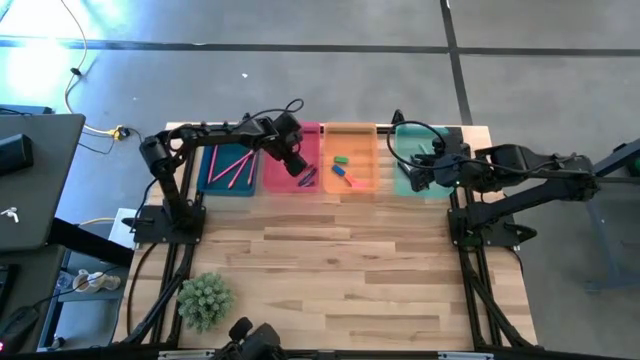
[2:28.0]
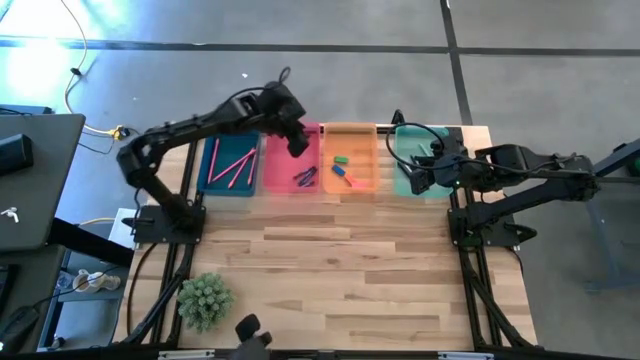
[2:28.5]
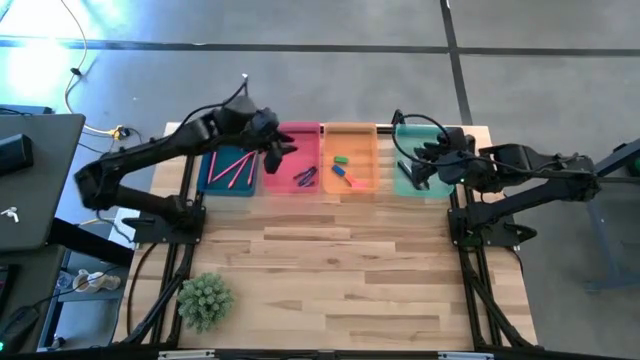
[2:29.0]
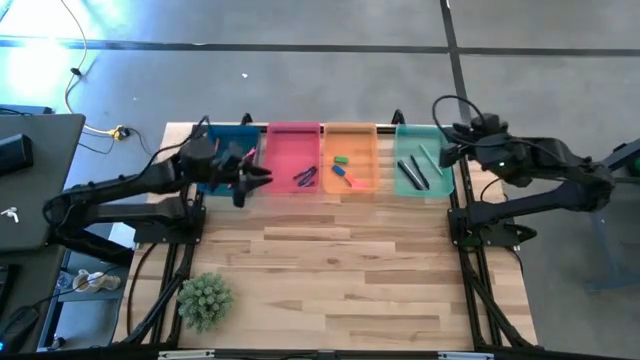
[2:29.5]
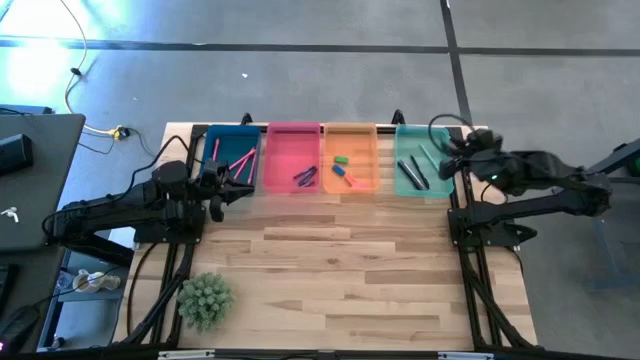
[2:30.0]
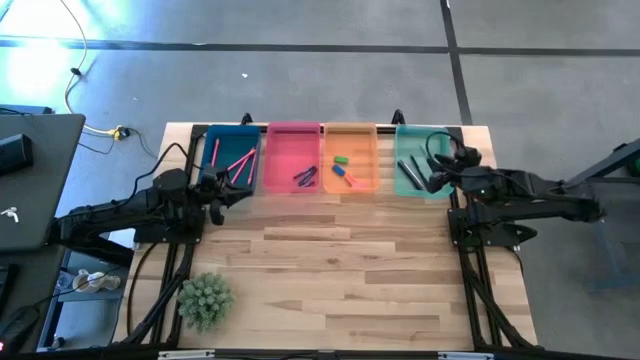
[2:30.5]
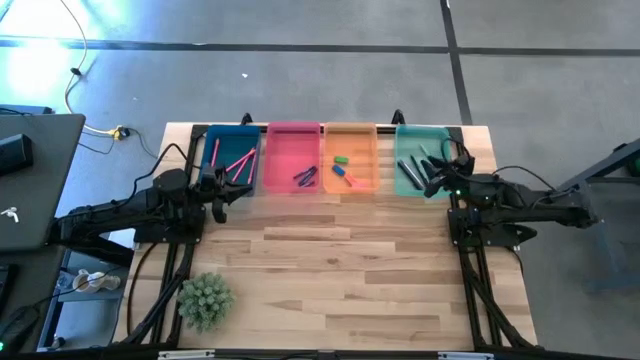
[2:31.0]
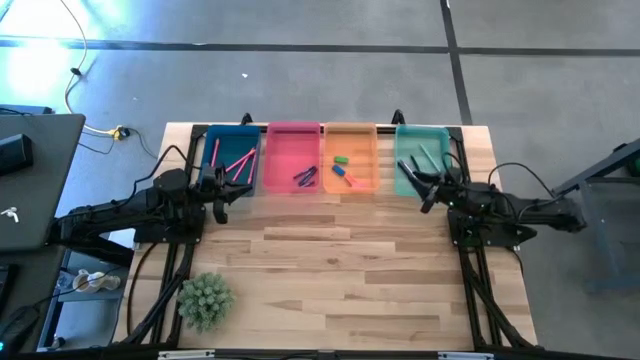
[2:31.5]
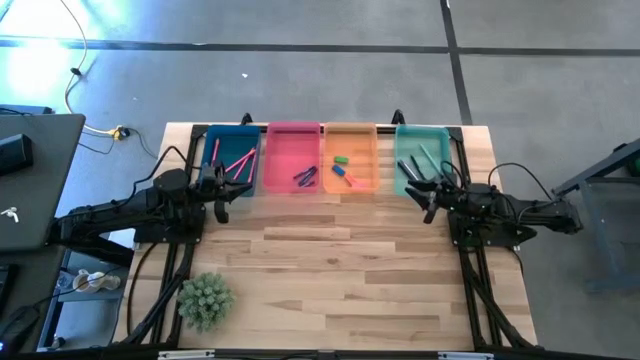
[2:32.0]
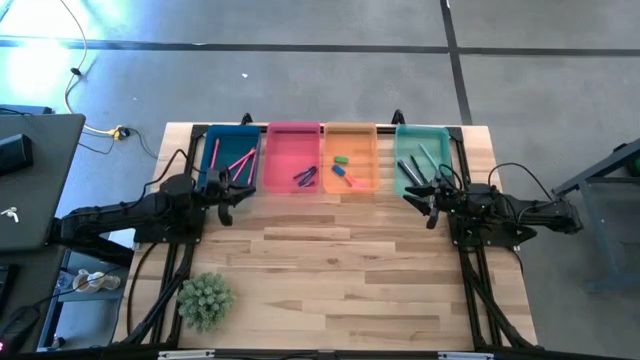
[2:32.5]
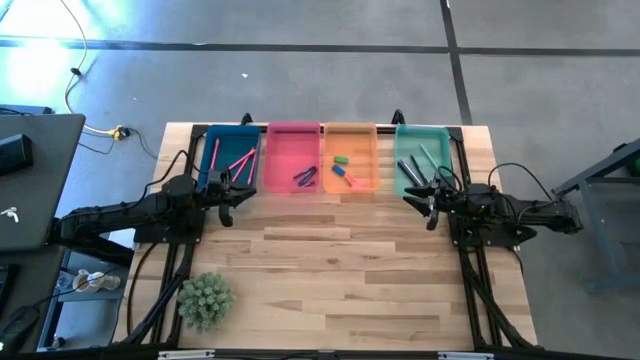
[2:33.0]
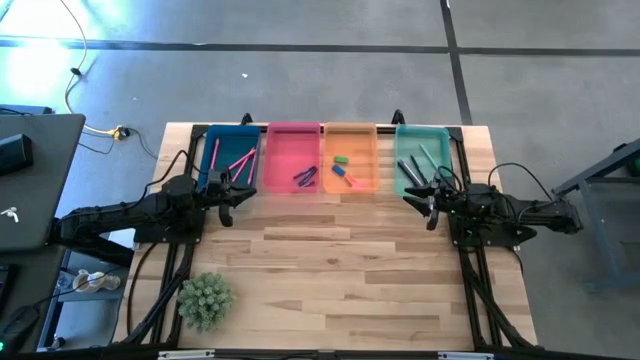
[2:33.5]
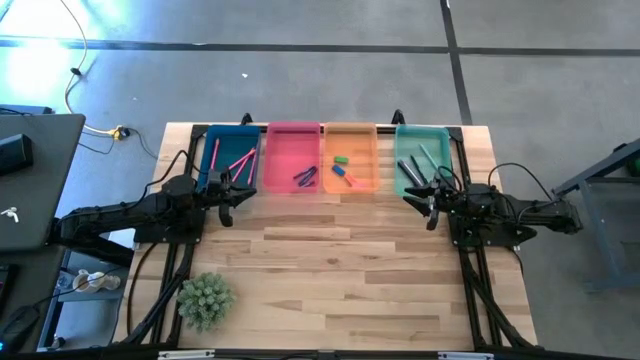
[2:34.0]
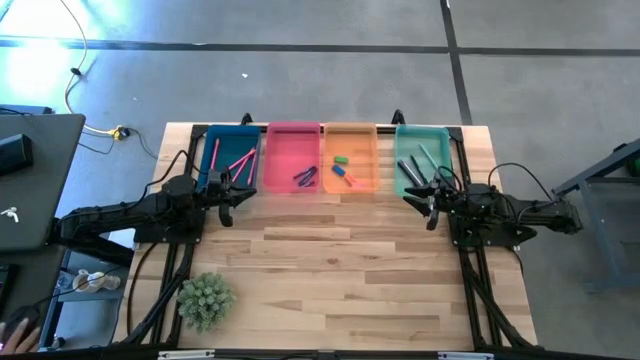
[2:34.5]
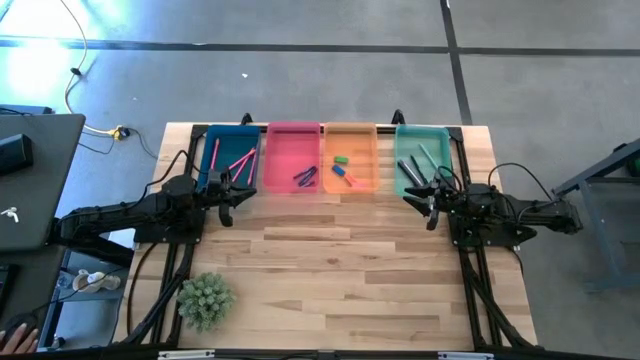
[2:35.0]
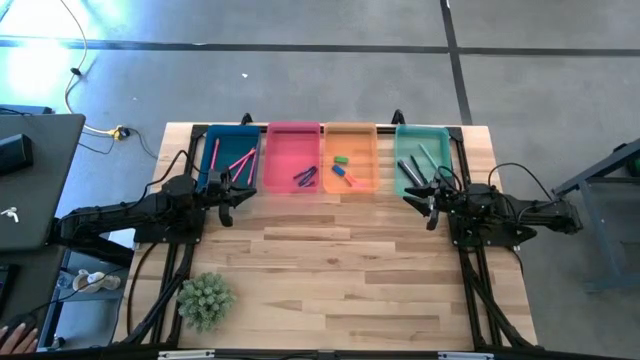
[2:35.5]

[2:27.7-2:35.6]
Task: Sort crayons/erasers/pens/pencils in bins
Return to Home Position

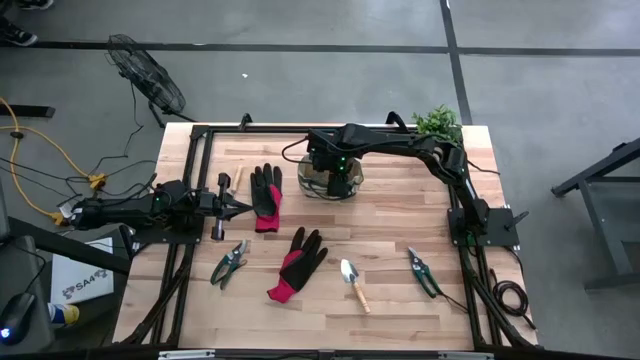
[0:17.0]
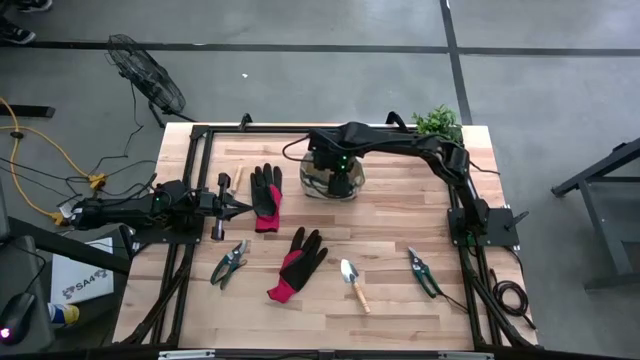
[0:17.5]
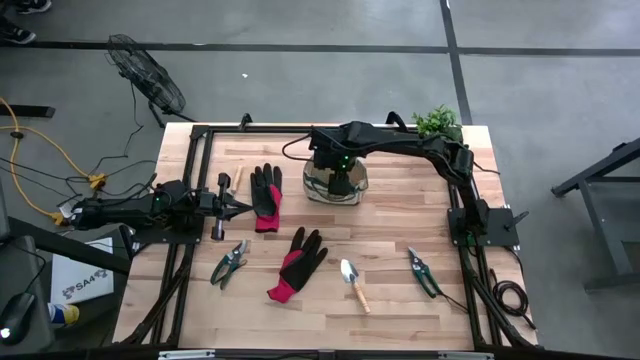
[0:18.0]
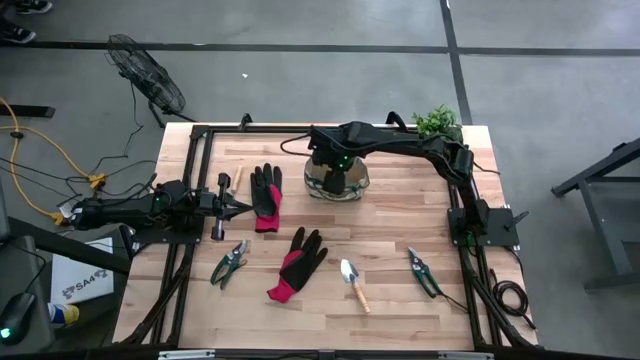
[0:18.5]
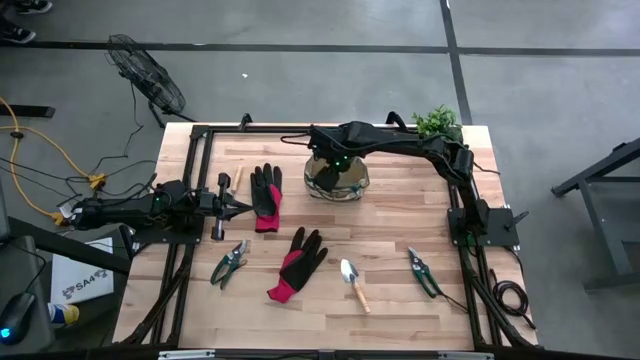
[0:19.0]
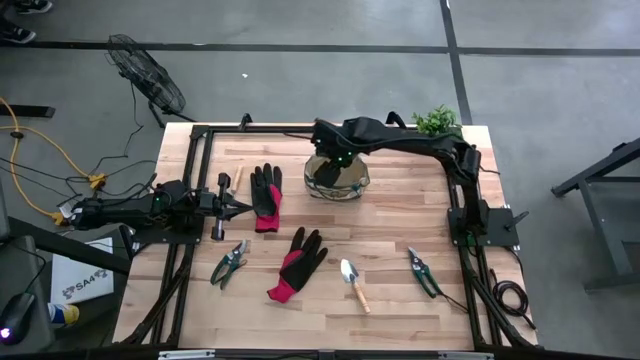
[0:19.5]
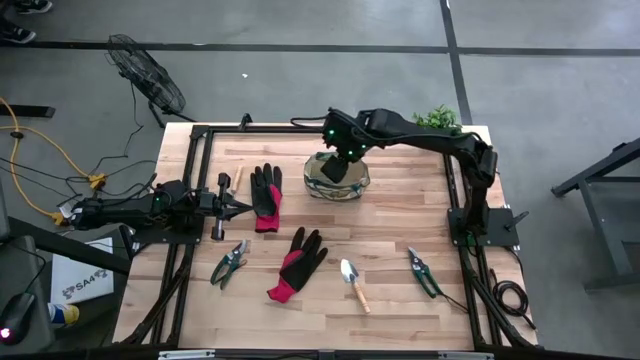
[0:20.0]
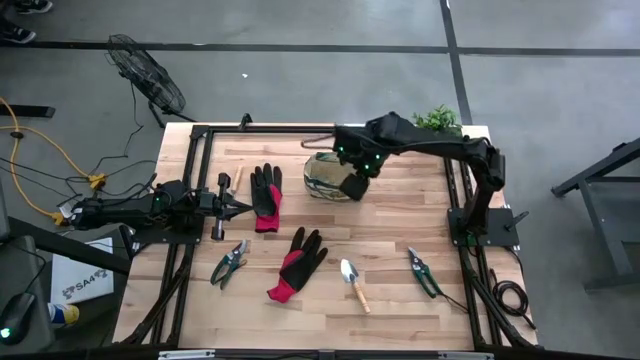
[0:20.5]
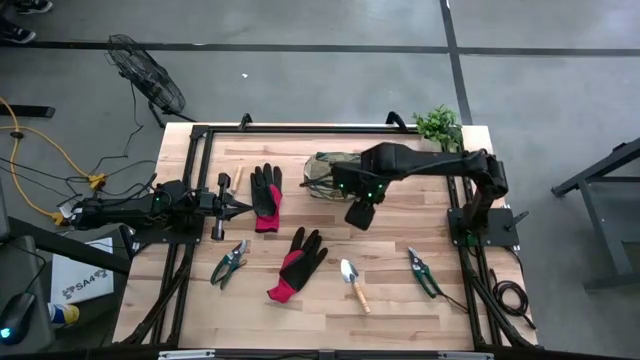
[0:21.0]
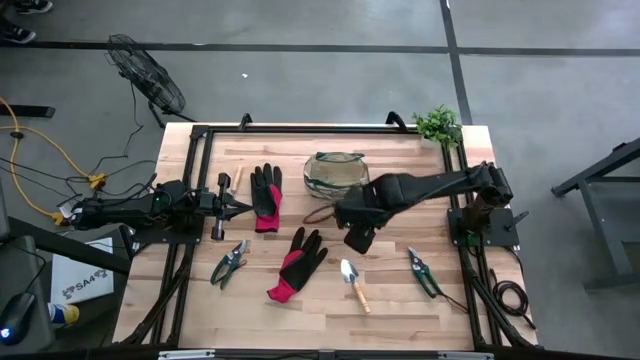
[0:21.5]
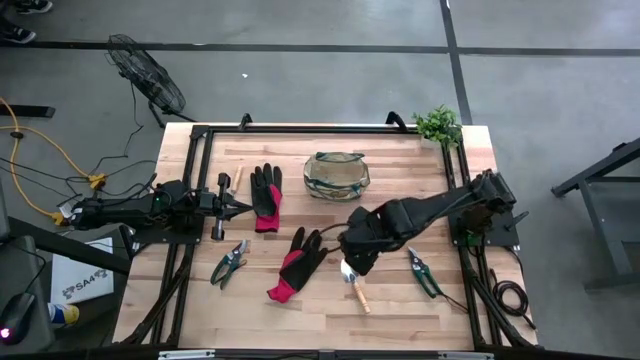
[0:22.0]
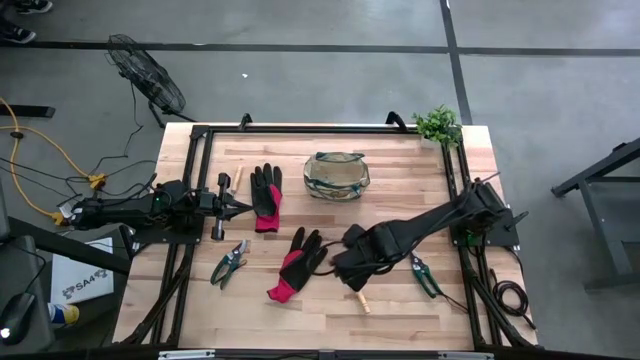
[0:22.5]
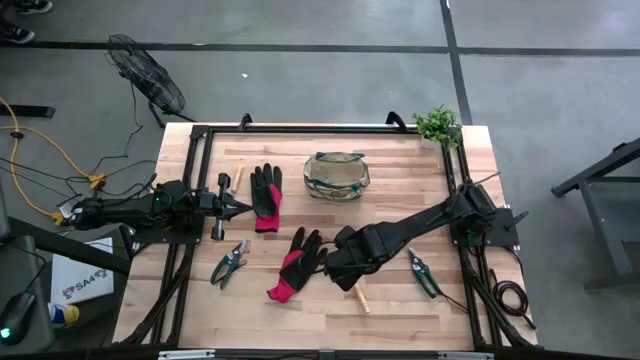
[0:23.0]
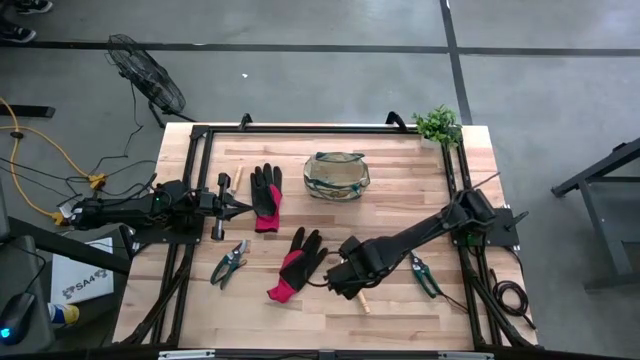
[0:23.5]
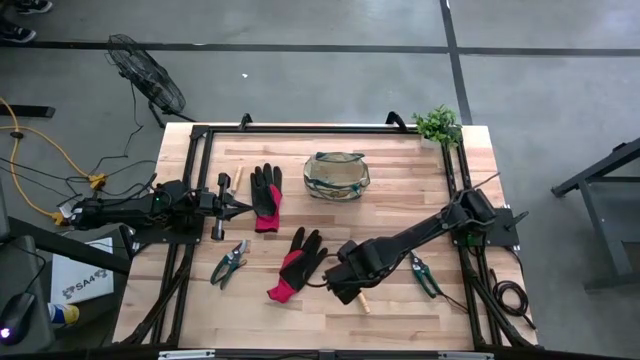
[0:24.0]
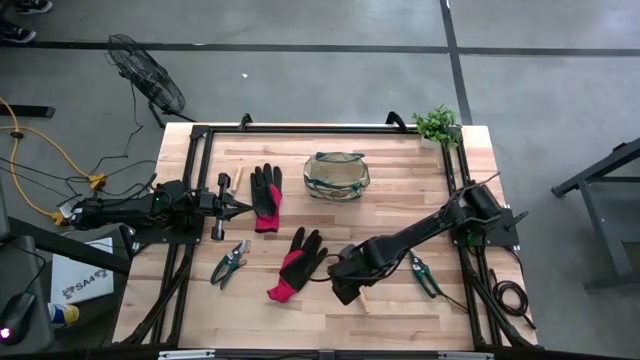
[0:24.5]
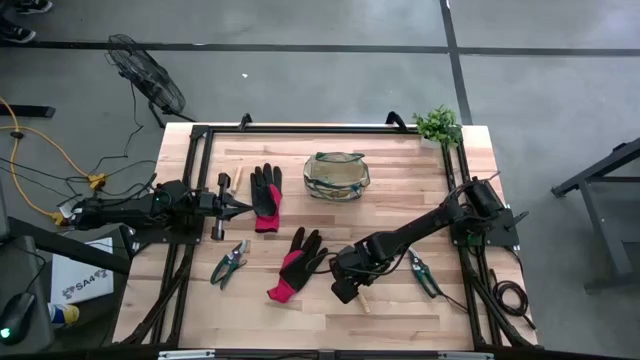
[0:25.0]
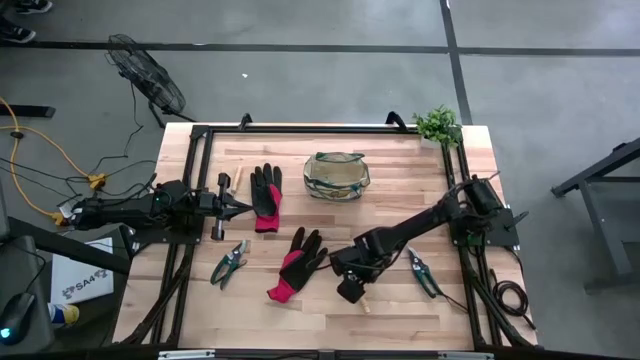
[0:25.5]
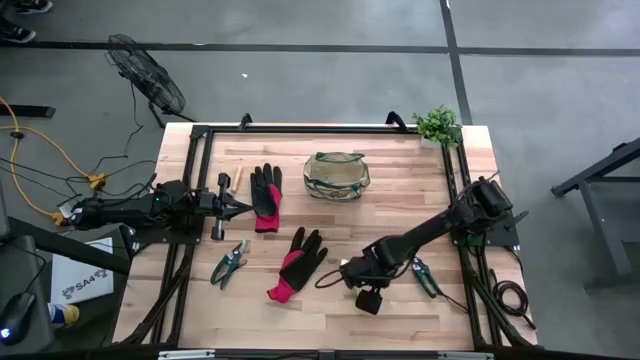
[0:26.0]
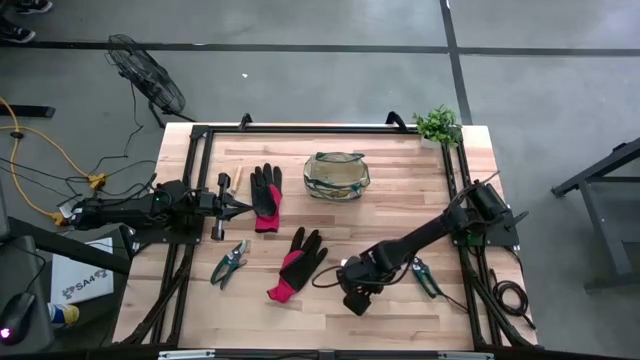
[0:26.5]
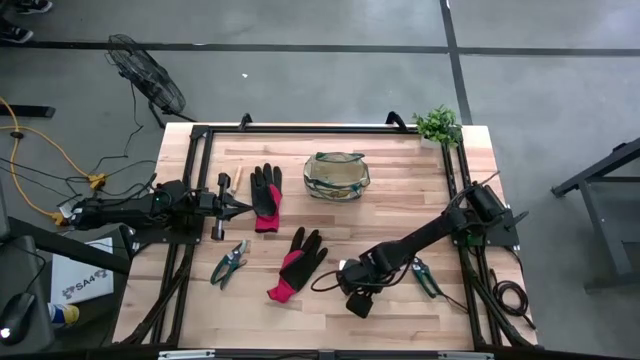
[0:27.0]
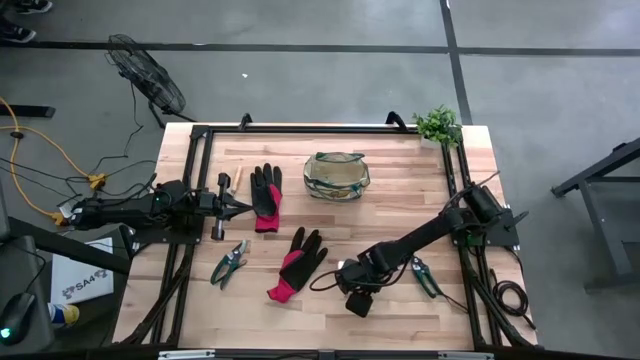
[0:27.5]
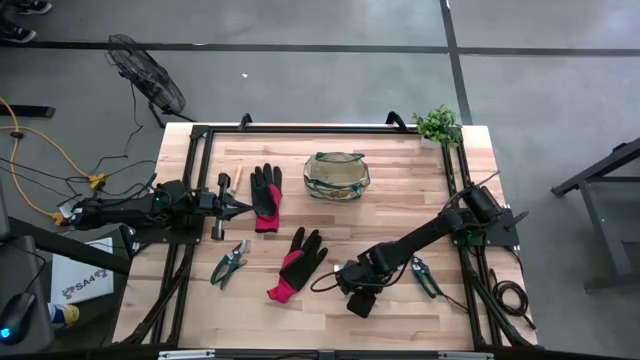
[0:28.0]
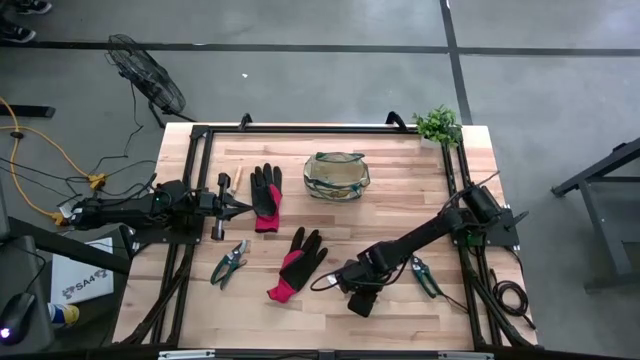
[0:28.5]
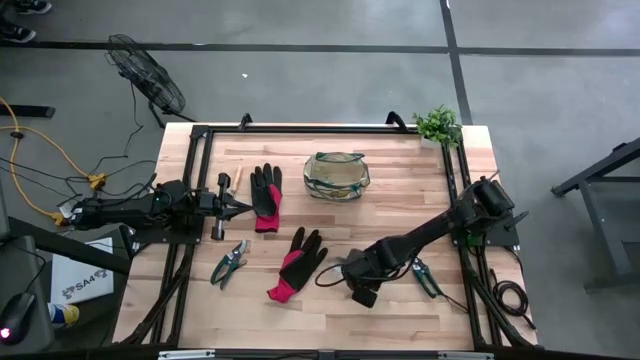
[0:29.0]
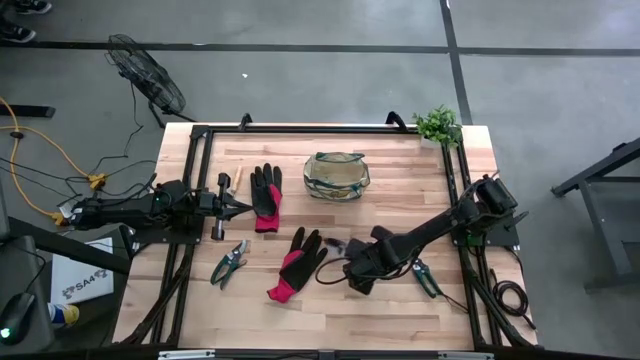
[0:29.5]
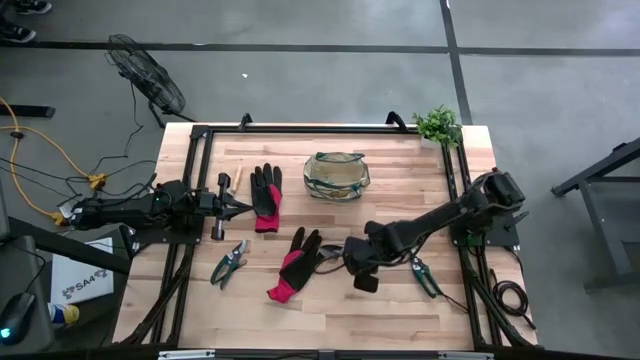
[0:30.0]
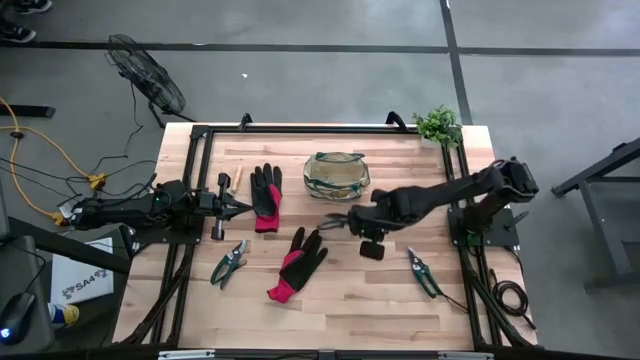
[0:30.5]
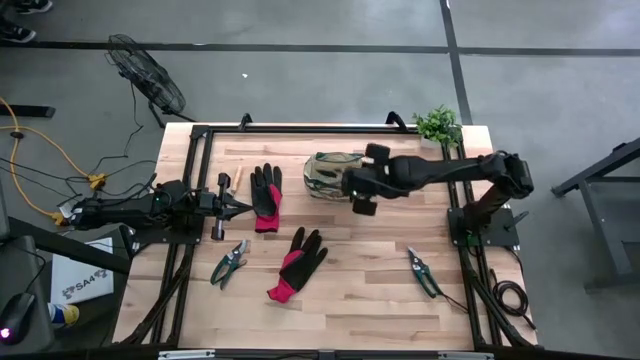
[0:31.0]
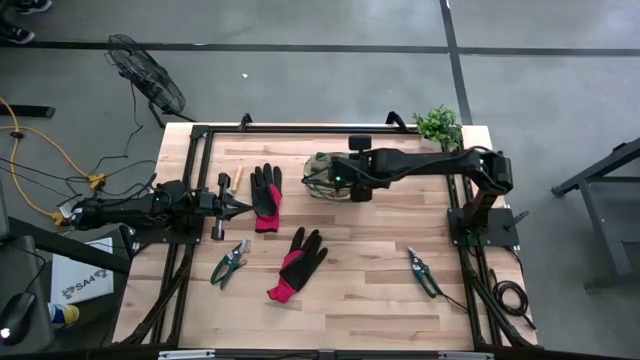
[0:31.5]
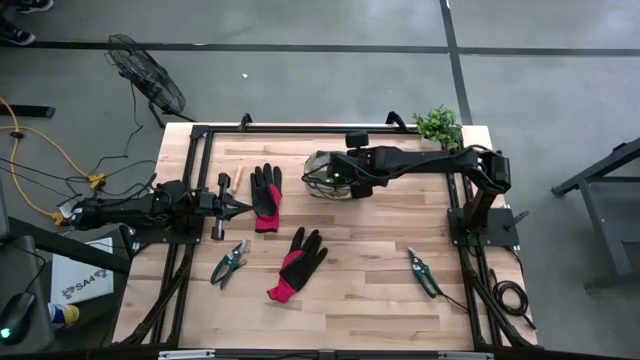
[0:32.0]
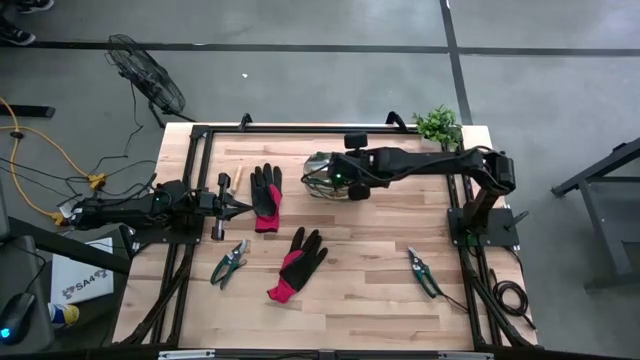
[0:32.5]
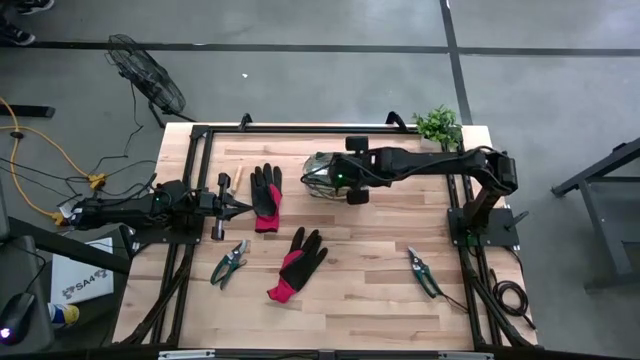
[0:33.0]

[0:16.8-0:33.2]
Task: Pick & Place Garden tools in Gardening bag
Put the brown trowel into the gardening bag
